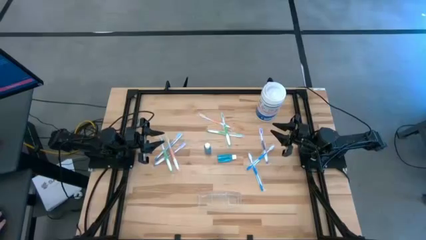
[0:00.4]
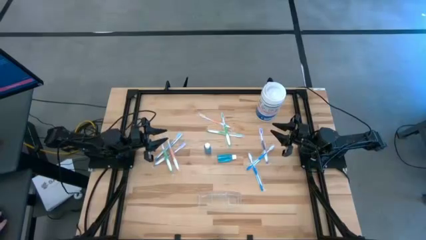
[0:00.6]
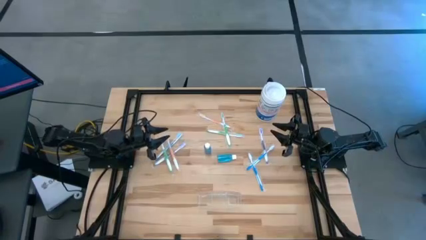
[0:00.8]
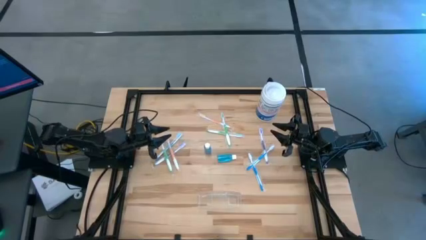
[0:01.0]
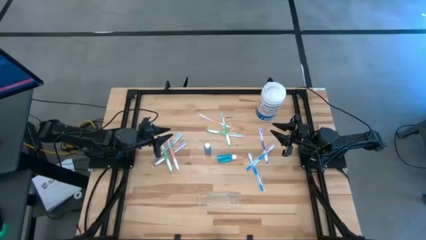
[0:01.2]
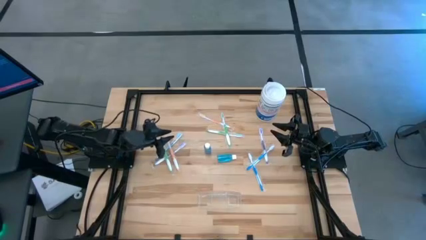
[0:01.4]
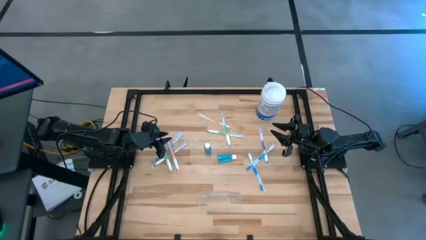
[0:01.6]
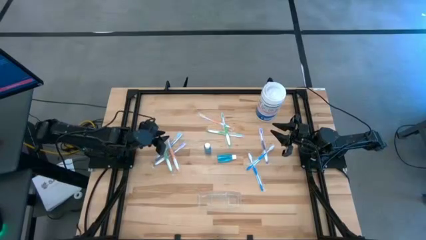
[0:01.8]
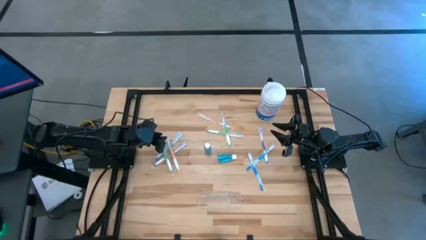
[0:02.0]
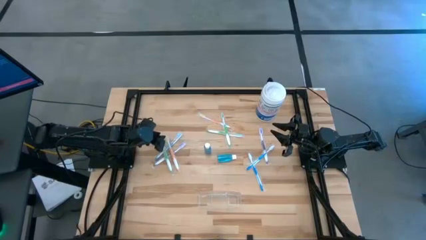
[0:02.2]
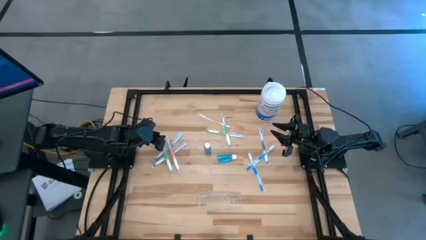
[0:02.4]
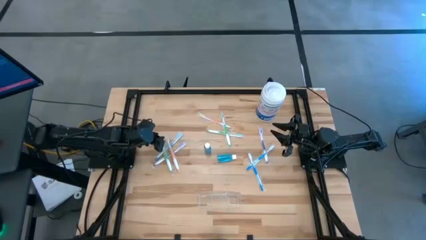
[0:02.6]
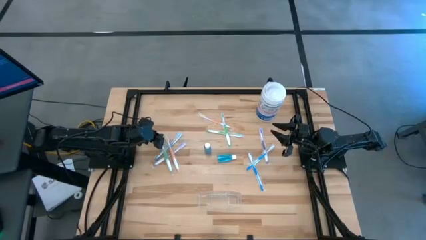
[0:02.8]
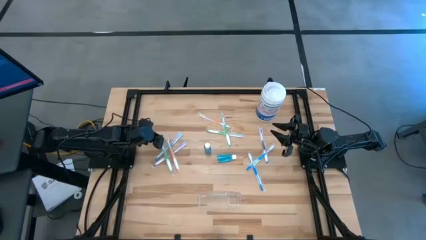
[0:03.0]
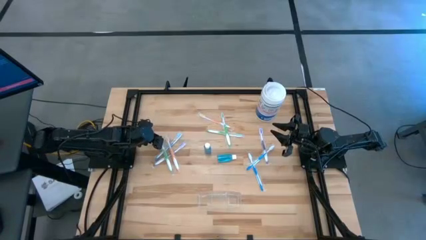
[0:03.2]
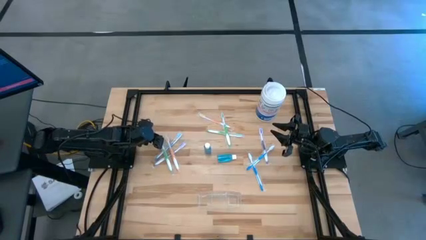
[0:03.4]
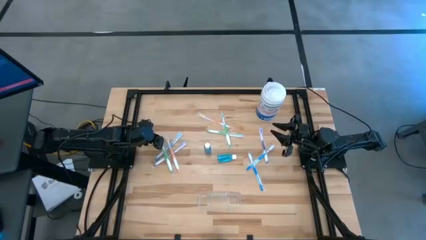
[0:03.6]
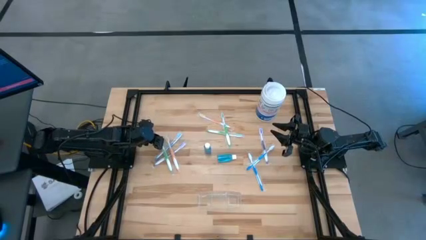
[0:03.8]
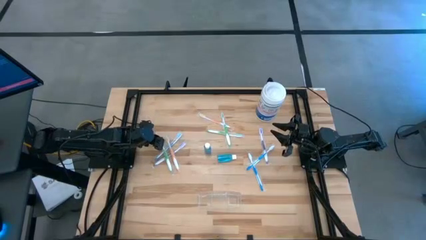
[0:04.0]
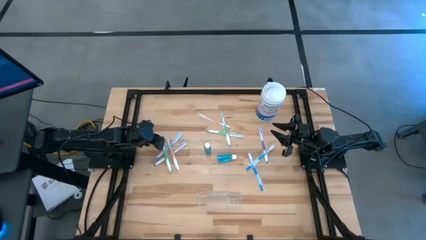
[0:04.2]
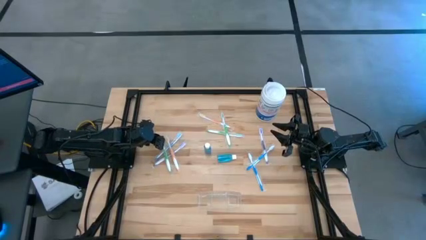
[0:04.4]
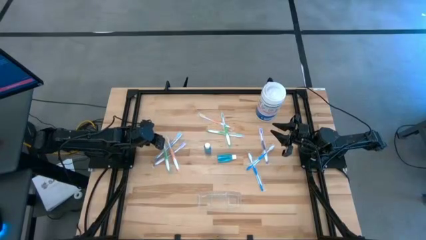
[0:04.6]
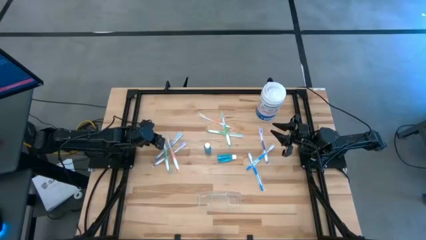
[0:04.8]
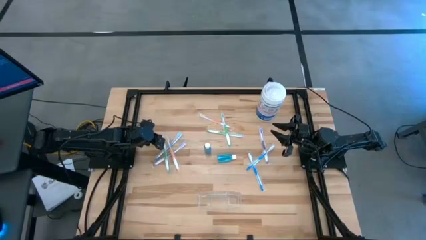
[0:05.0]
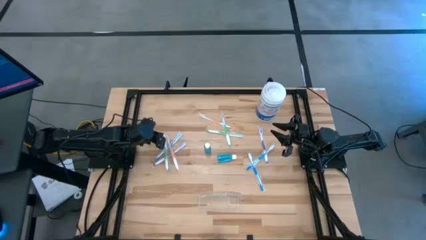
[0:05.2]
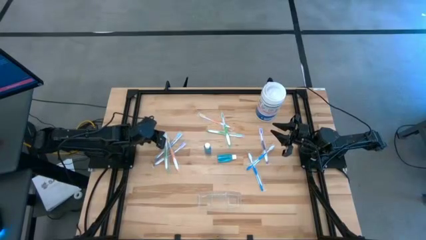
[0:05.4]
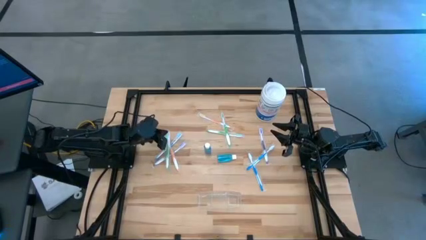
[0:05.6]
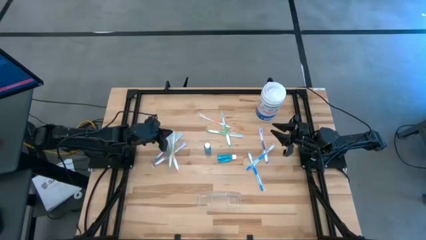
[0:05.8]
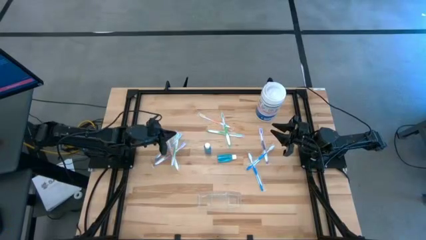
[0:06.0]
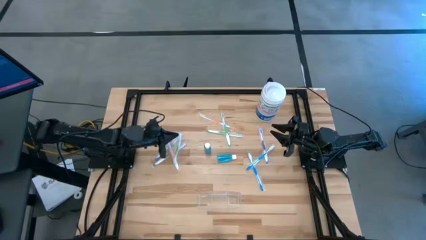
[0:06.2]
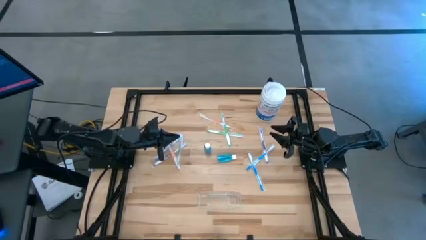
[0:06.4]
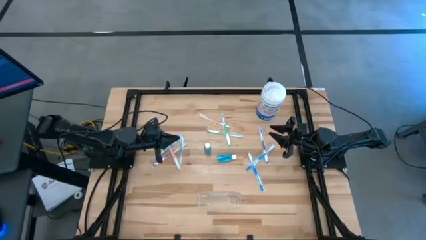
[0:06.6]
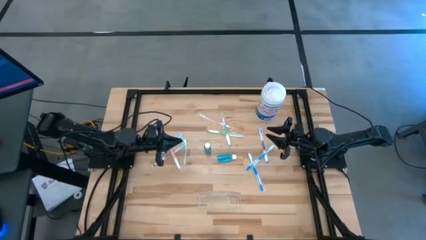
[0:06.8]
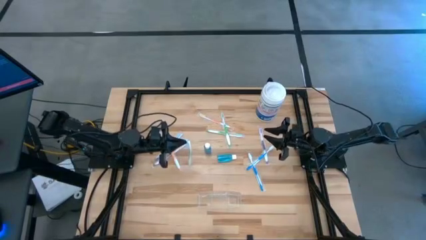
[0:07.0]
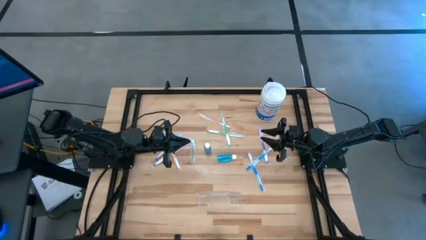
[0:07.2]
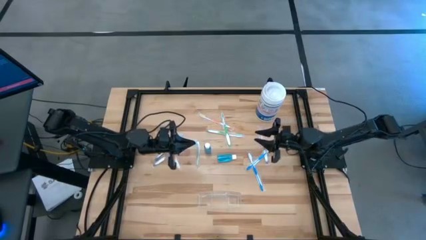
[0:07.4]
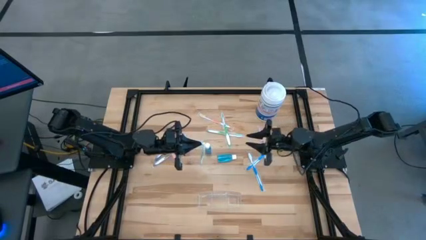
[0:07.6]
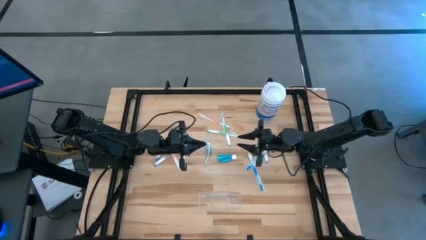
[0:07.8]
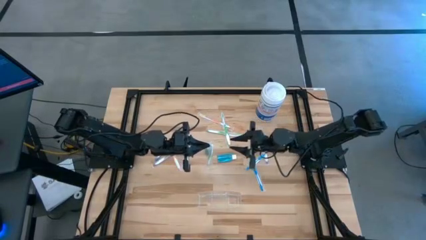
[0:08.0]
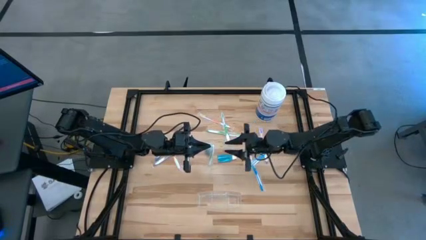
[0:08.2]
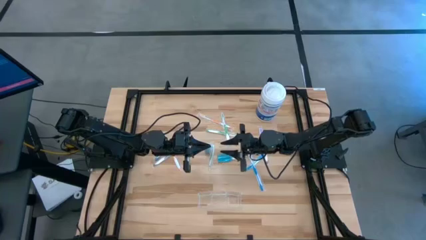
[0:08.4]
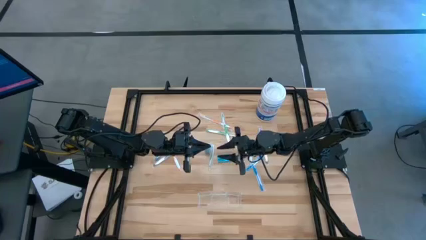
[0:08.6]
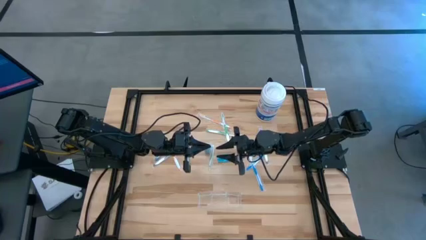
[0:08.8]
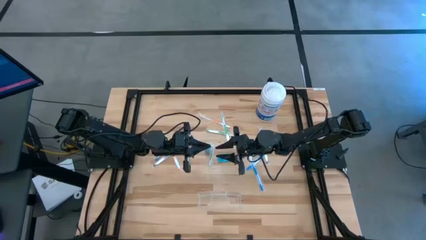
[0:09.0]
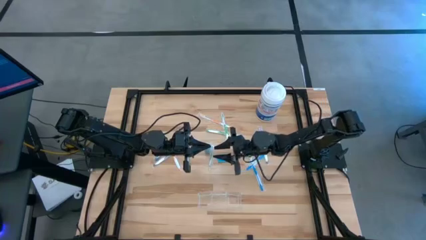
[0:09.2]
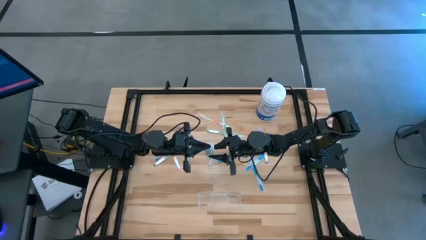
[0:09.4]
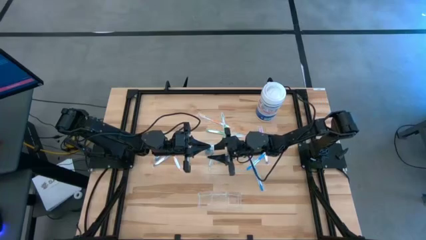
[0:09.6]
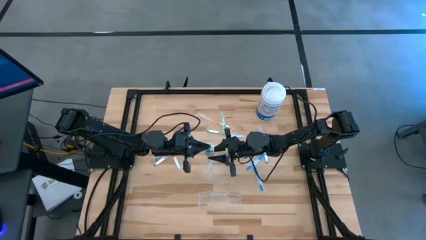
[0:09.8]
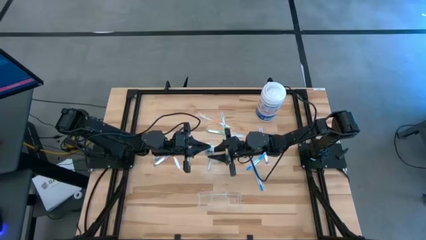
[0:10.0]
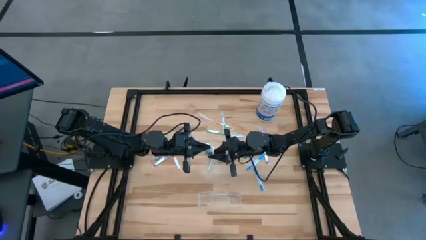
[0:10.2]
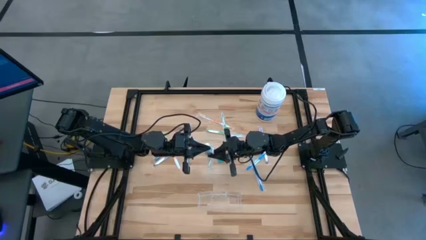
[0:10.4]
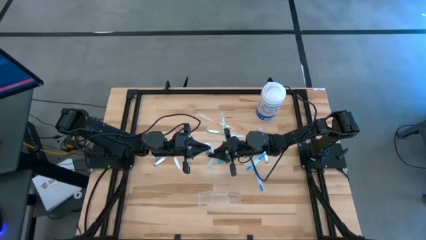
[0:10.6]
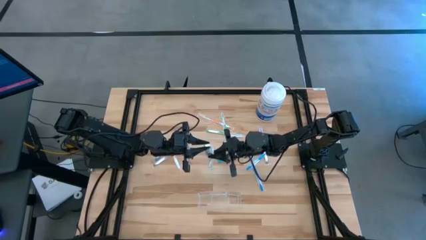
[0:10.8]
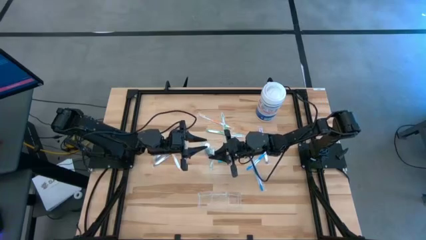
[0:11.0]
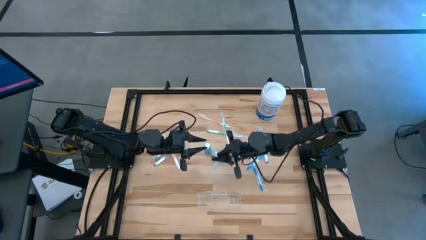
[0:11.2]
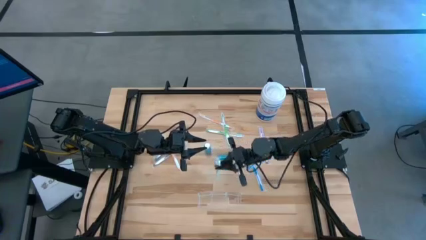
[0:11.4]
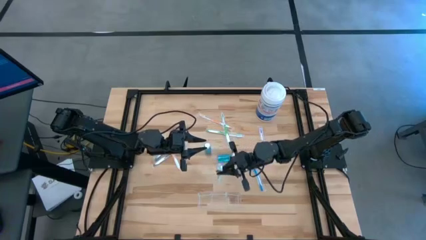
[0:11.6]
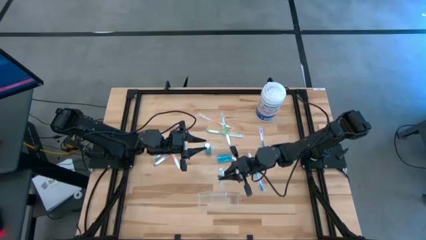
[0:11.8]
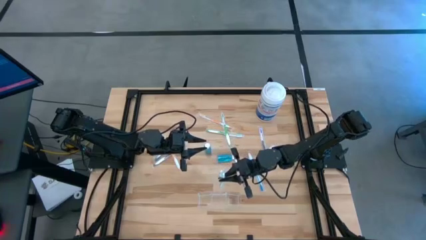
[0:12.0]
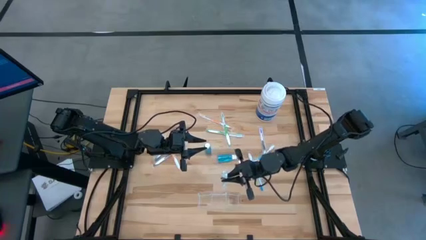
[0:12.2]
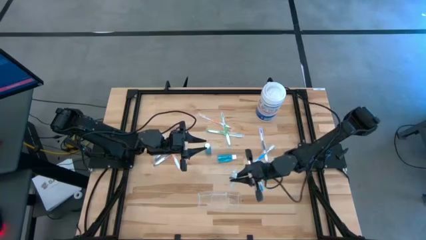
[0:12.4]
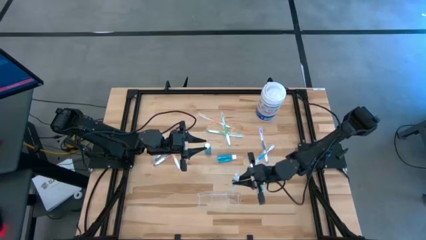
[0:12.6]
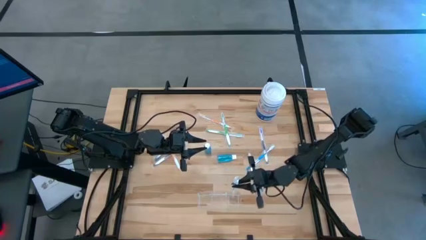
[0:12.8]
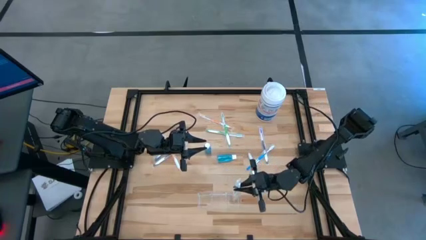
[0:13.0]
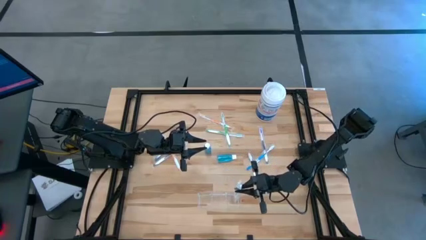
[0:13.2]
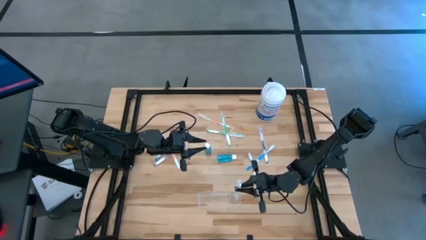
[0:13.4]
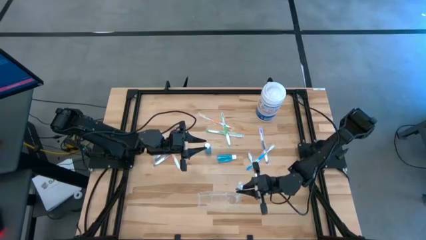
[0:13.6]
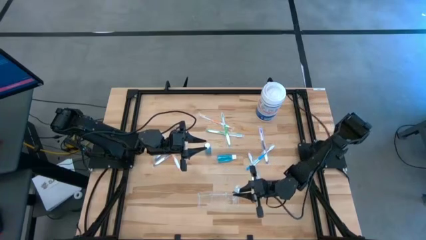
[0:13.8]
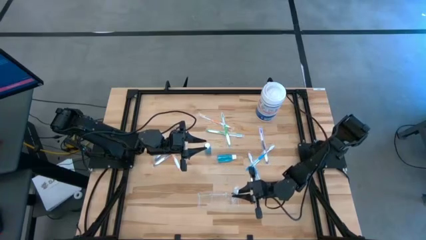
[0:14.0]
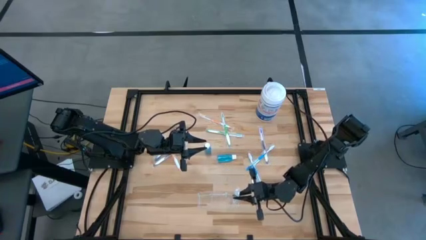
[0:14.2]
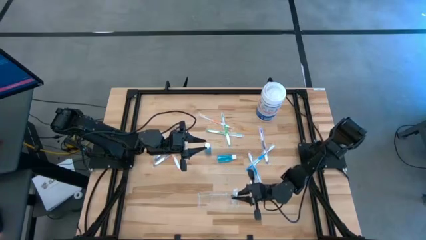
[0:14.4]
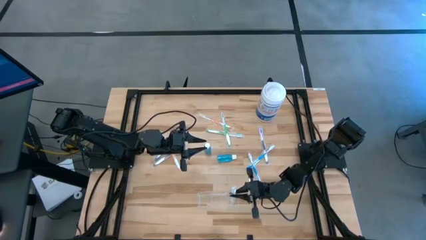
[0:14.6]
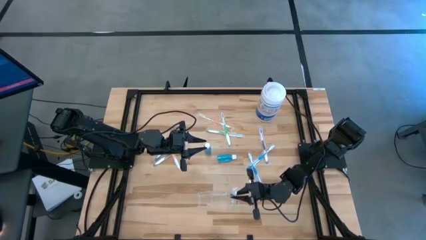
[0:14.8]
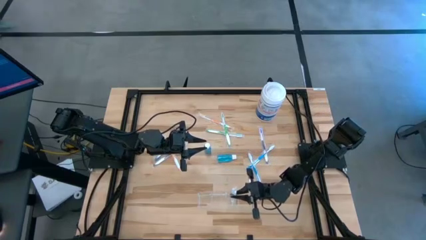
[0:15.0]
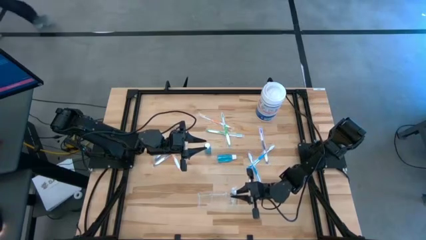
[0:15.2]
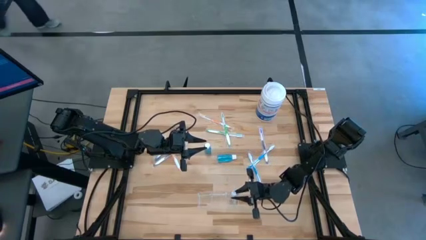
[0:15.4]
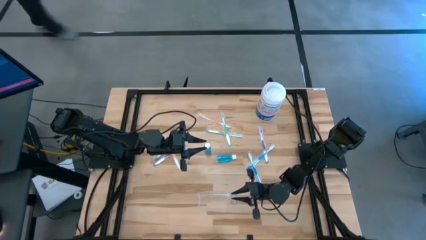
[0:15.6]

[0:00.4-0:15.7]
Task: Pick & Place toothbrushing station
Put the green toothbrush into the transparent organizer
